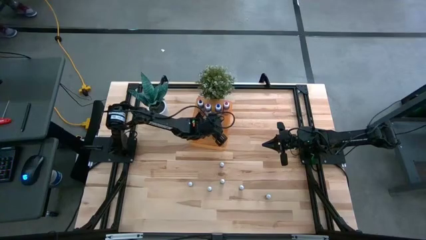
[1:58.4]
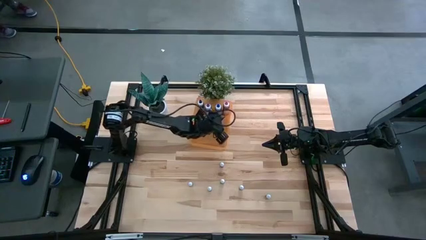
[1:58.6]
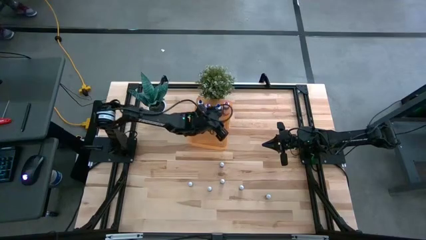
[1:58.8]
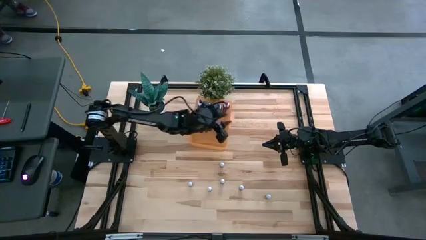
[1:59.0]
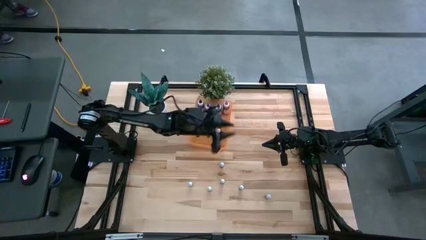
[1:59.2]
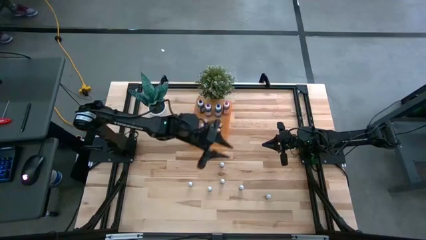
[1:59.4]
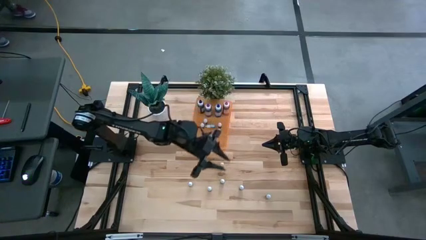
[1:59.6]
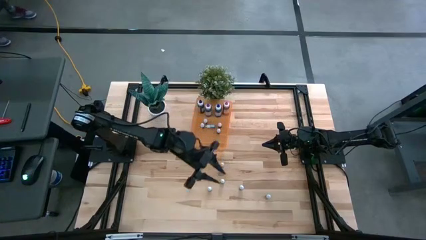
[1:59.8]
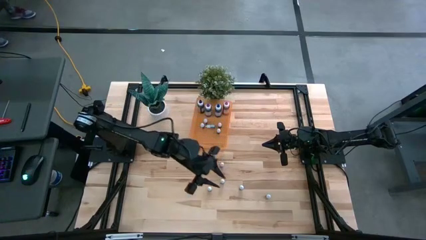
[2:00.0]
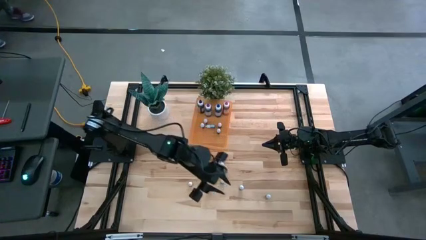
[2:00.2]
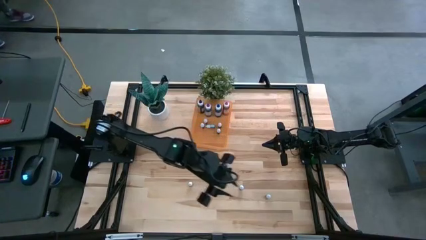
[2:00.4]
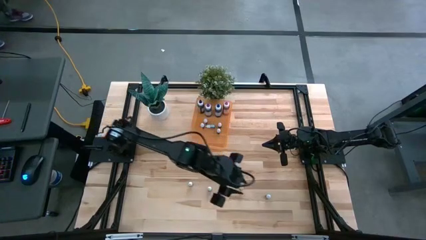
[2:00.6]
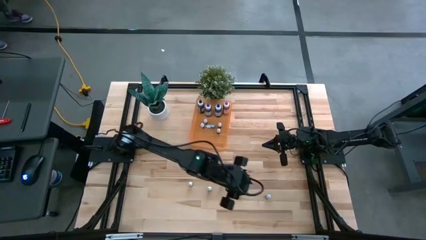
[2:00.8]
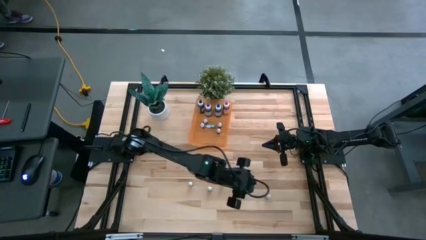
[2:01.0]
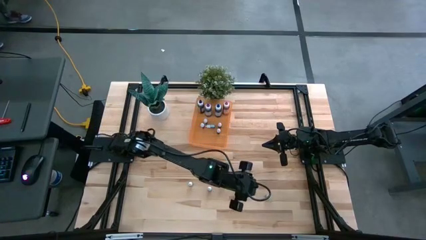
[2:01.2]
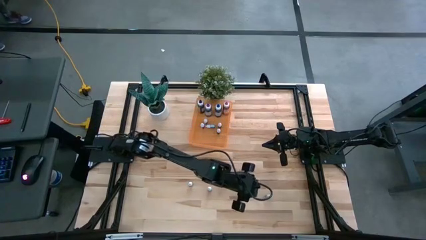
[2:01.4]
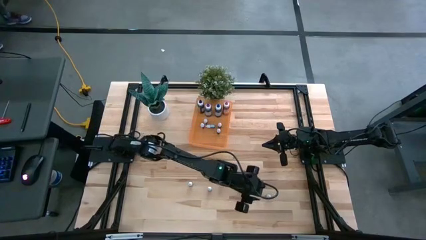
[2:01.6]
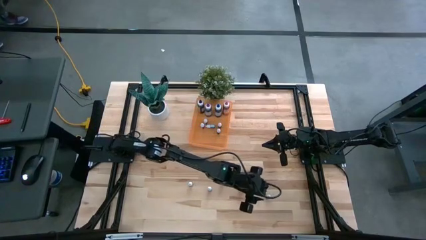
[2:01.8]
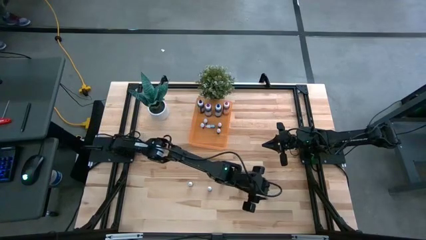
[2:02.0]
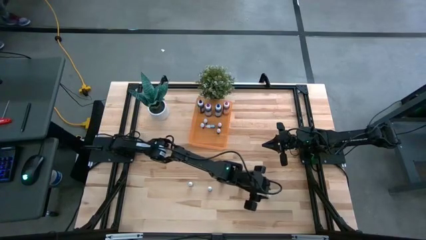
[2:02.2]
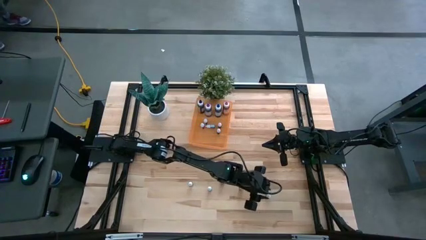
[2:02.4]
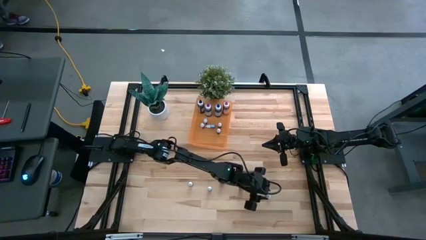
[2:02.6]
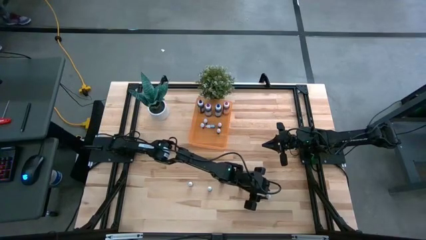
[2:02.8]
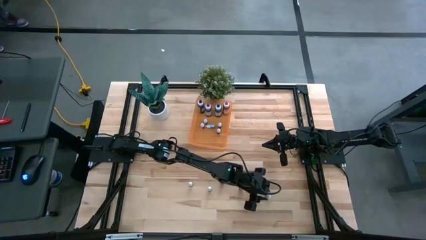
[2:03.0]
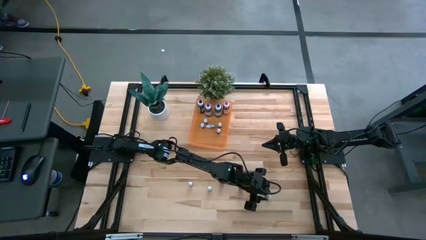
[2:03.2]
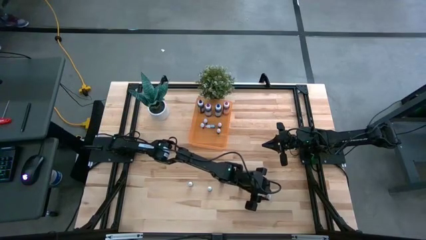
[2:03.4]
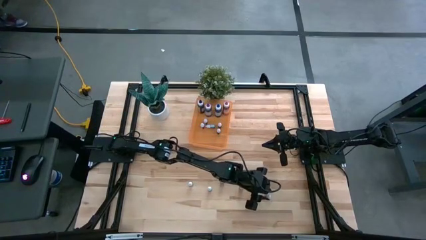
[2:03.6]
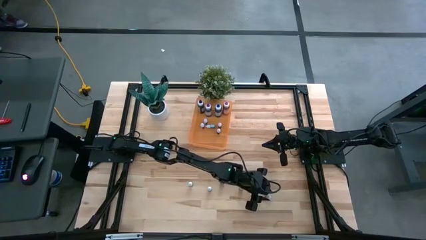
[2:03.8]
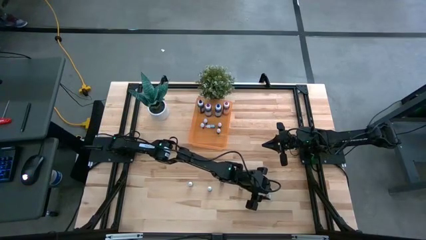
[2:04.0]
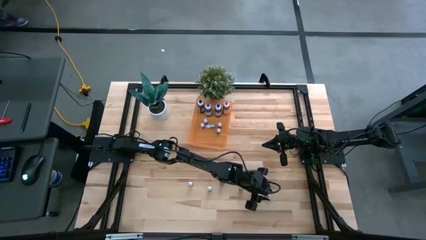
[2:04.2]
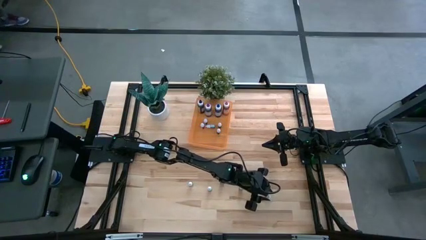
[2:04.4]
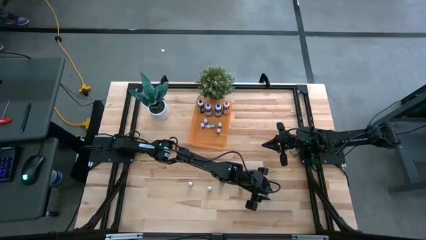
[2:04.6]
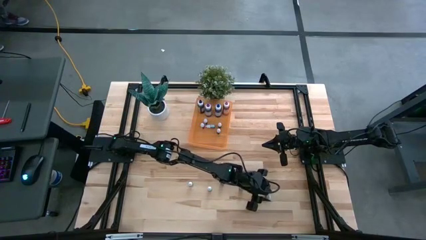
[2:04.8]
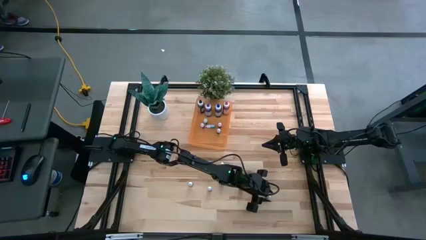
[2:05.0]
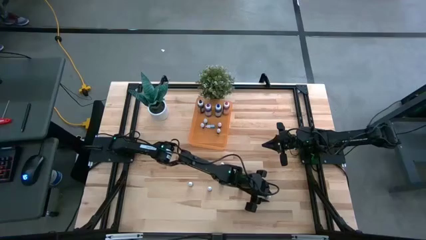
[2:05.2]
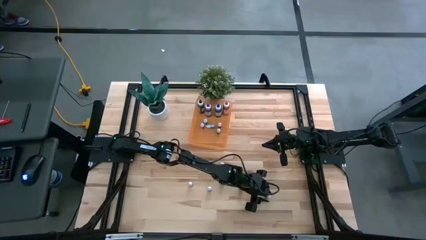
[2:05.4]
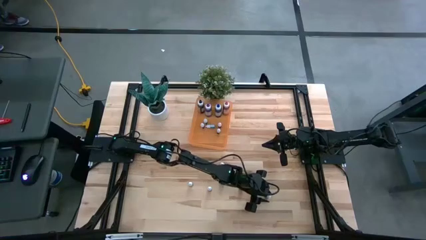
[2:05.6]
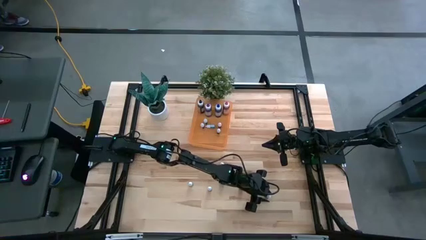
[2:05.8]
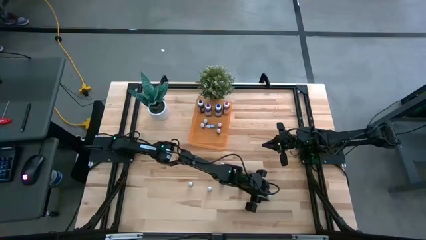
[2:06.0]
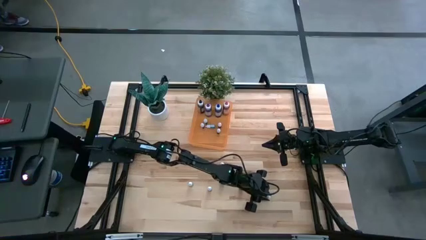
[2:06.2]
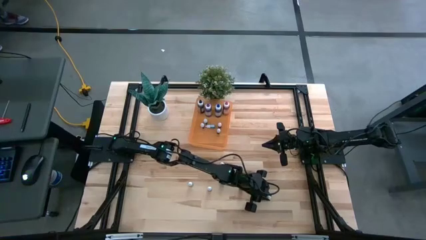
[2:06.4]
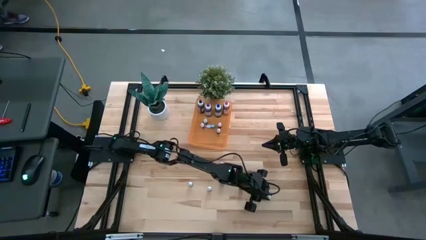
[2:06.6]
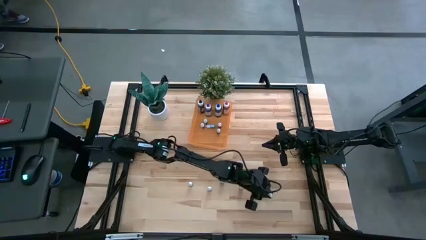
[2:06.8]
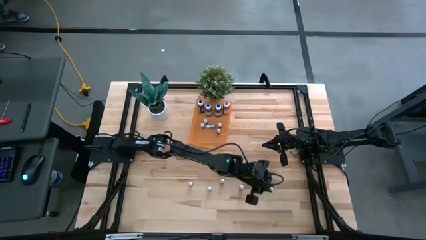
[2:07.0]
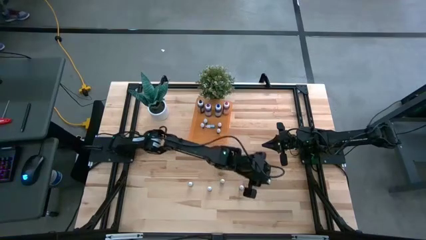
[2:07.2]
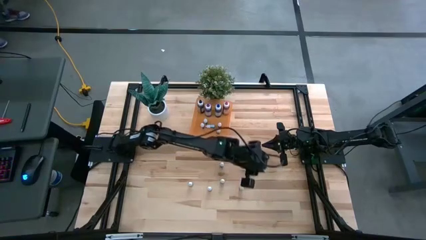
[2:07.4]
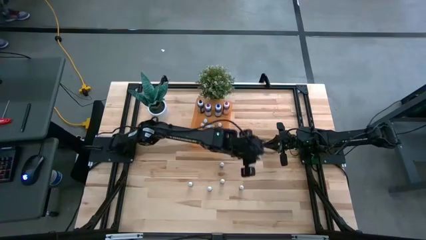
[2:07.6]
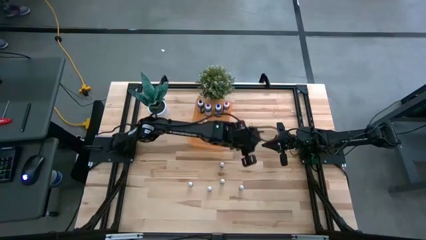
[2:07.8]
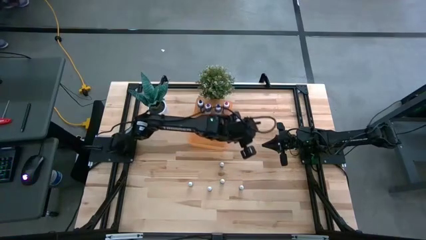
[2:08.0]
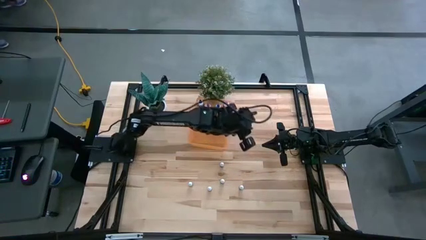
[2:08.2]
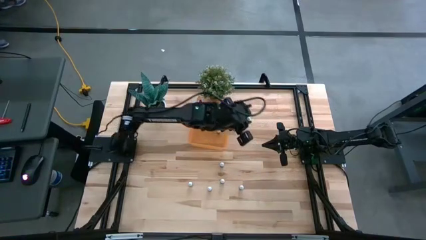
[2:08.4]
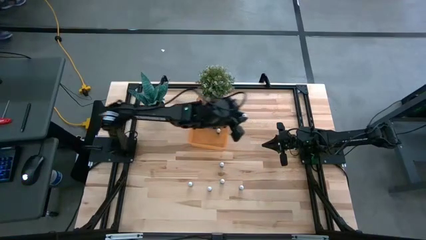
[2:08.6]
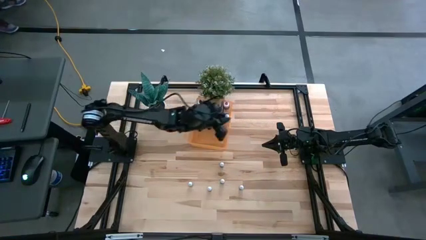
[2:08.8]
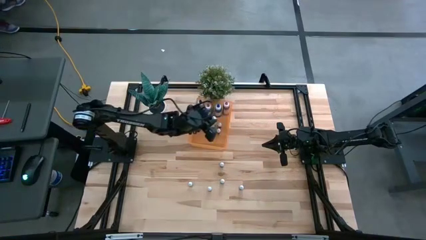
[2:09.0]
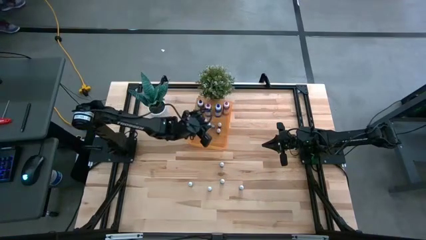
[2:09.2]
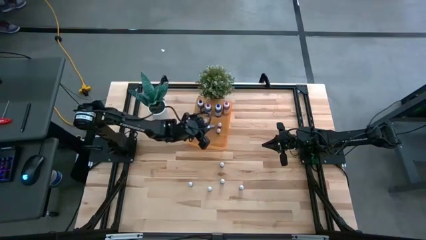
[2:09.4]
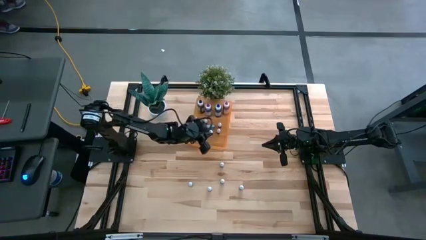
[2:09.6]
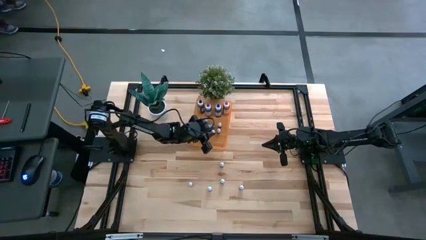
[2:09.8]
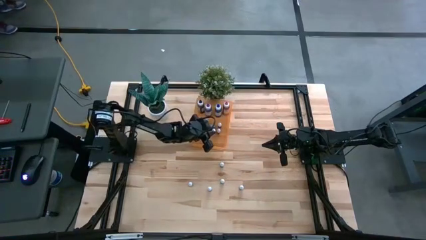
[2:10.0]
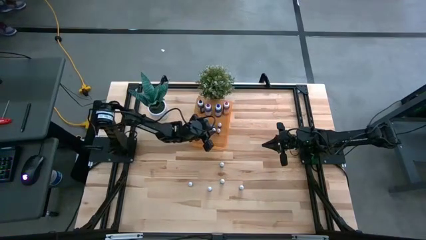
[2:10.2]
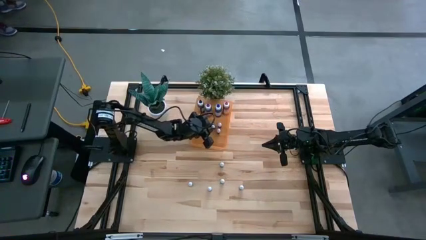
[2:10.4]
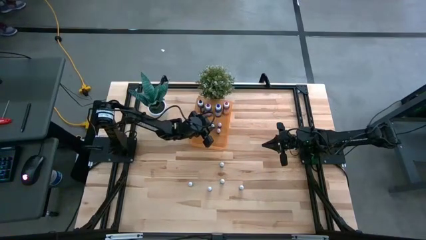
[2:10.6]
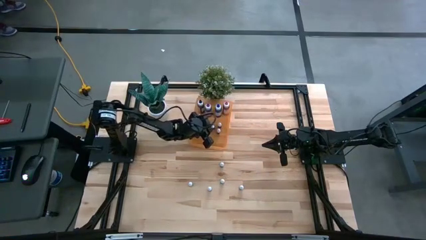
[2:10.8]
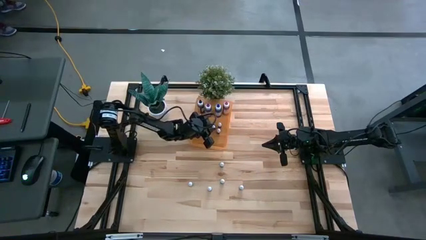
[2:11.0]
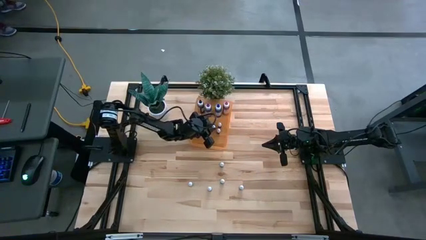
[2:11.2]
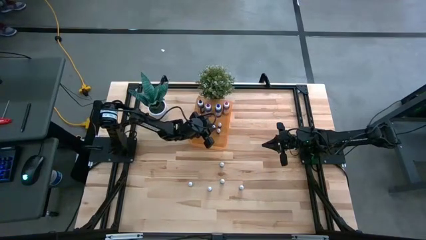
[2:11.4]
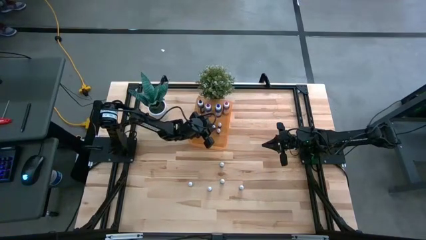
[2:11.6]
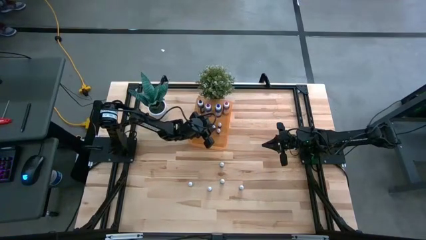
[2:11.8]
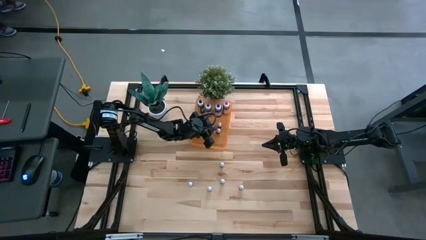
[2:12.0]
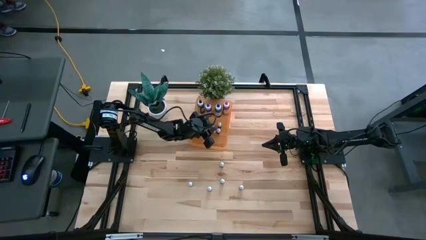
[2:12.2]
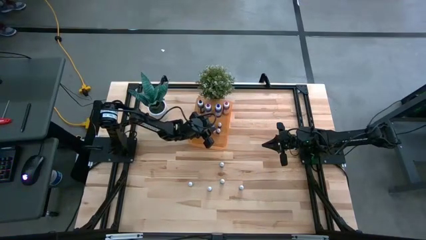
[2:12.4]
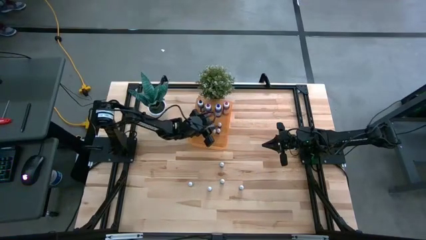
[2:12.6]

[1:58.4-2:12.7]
Task: Pick & Place food coloring
Put the small dark purple food coloring bottle into the orange bin
